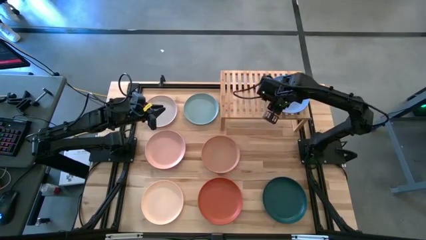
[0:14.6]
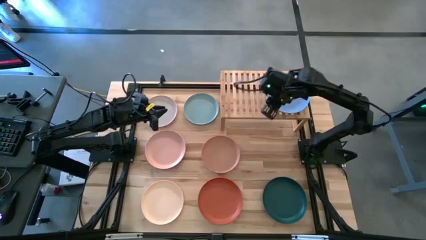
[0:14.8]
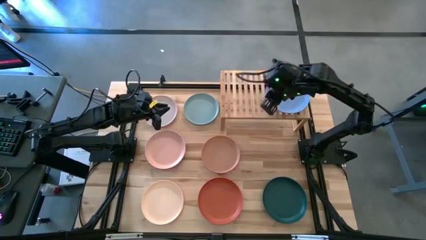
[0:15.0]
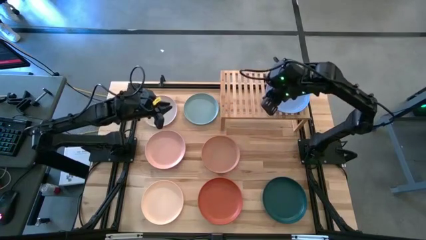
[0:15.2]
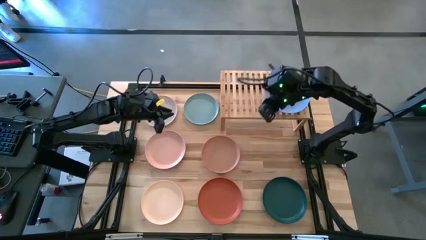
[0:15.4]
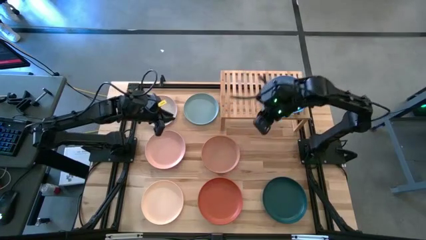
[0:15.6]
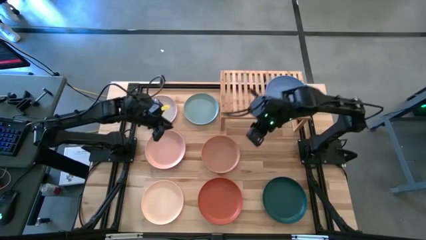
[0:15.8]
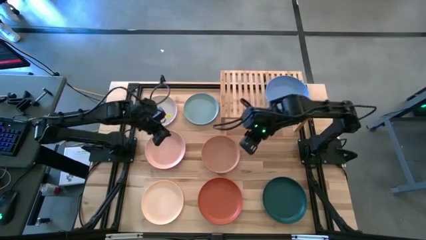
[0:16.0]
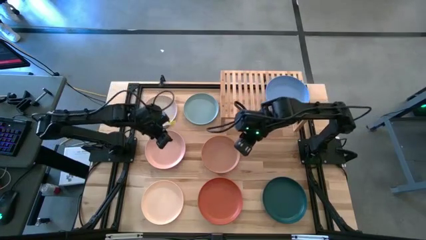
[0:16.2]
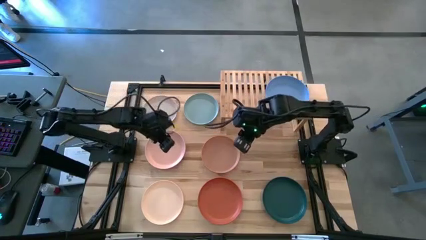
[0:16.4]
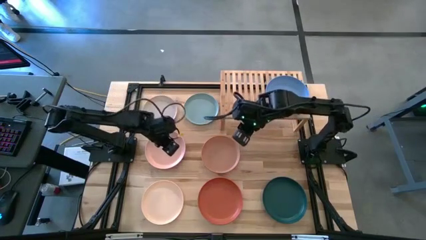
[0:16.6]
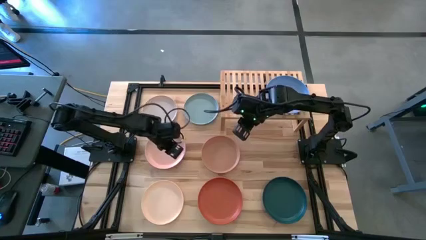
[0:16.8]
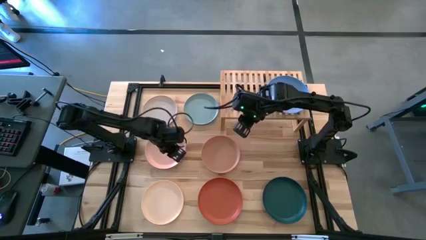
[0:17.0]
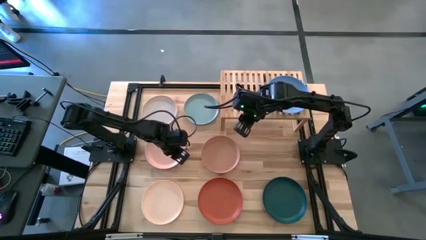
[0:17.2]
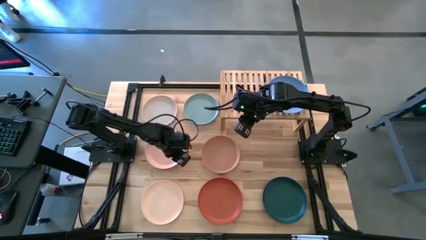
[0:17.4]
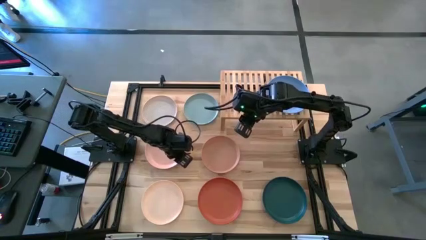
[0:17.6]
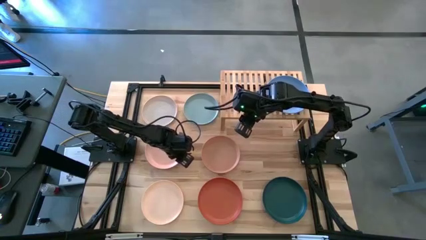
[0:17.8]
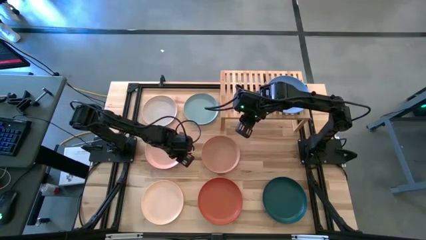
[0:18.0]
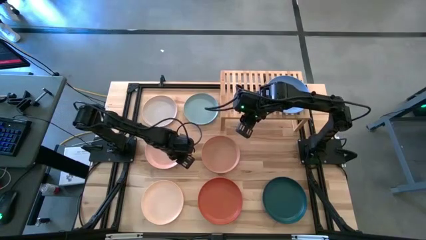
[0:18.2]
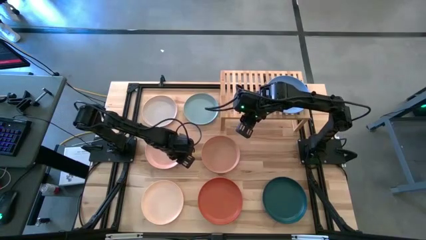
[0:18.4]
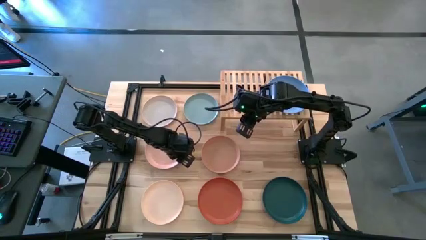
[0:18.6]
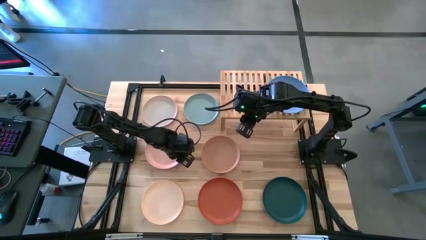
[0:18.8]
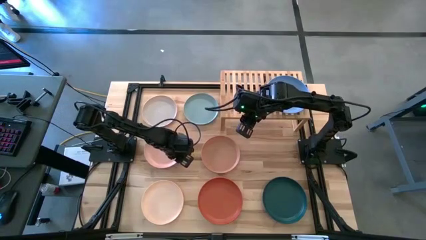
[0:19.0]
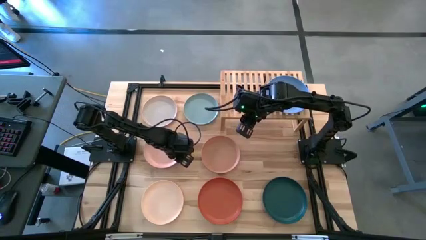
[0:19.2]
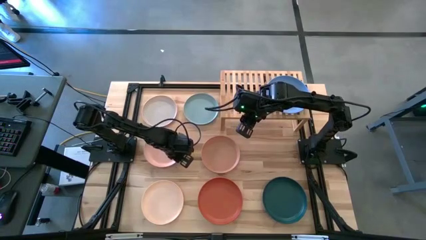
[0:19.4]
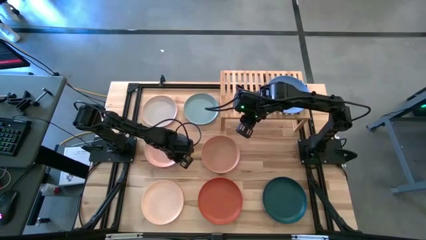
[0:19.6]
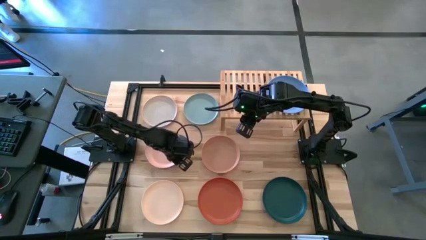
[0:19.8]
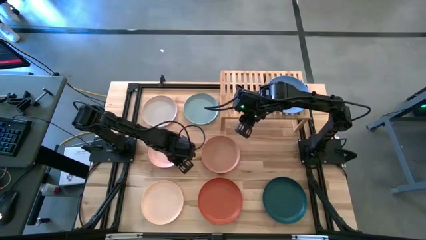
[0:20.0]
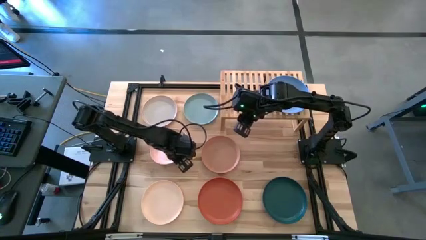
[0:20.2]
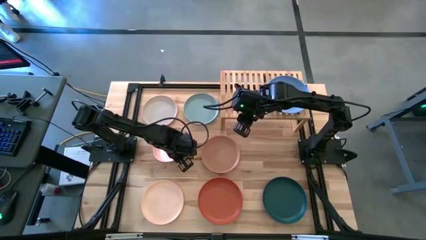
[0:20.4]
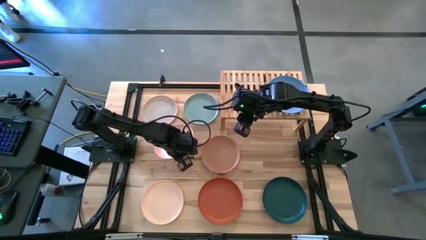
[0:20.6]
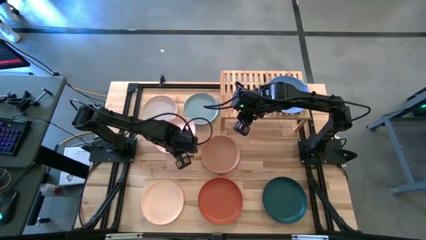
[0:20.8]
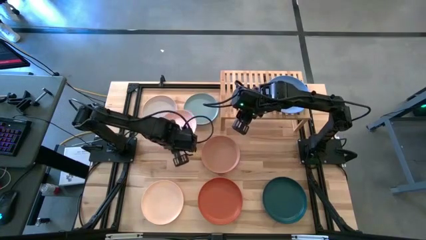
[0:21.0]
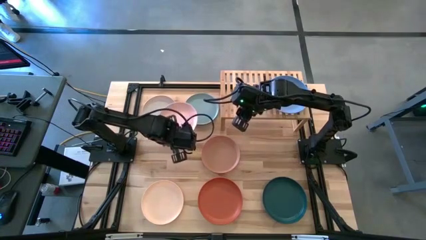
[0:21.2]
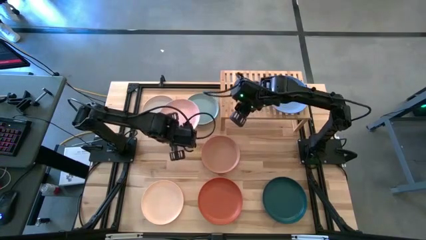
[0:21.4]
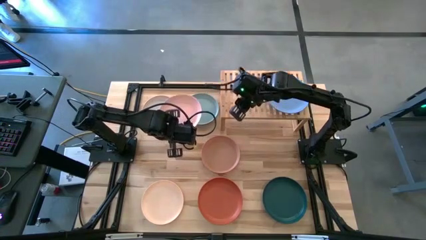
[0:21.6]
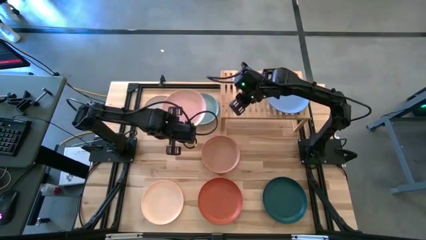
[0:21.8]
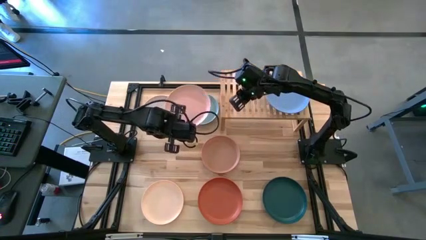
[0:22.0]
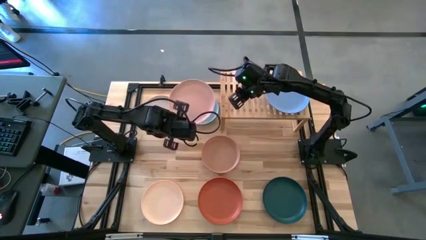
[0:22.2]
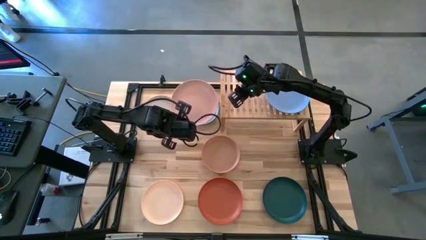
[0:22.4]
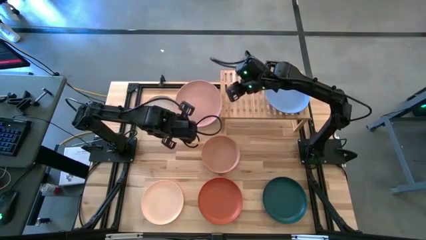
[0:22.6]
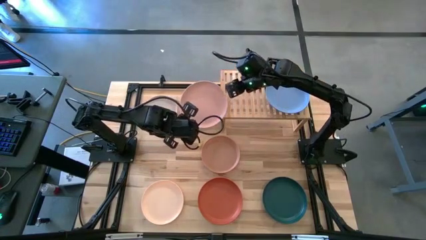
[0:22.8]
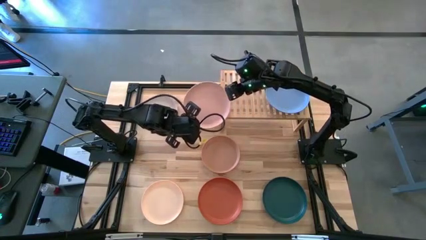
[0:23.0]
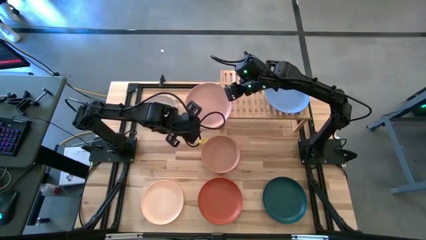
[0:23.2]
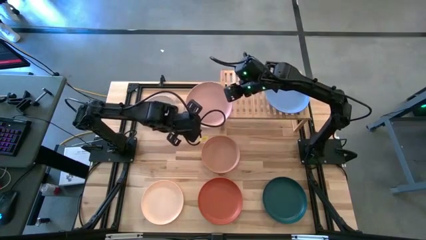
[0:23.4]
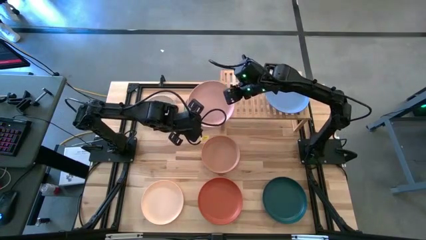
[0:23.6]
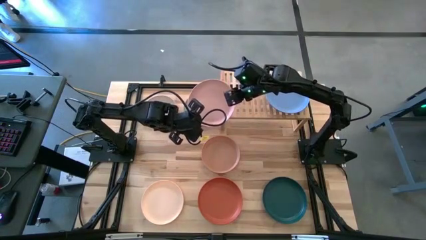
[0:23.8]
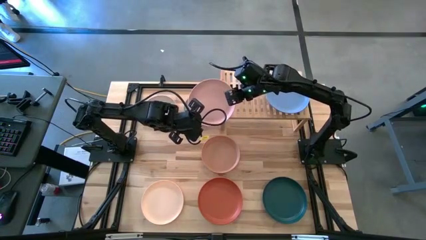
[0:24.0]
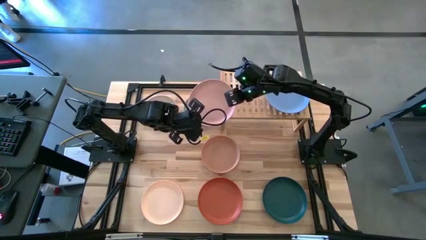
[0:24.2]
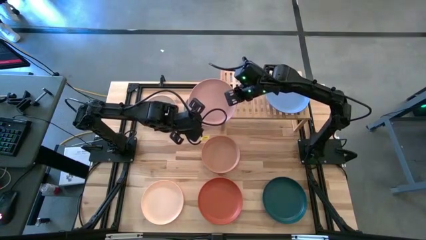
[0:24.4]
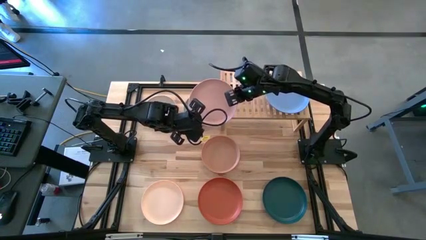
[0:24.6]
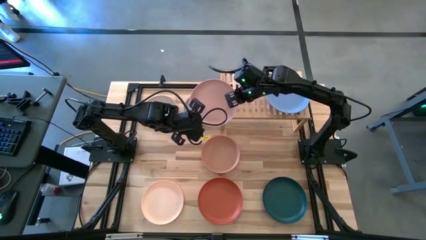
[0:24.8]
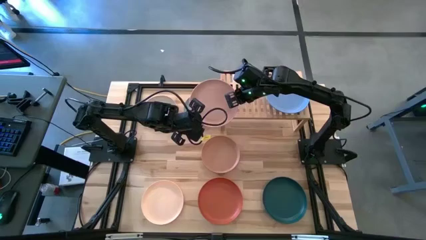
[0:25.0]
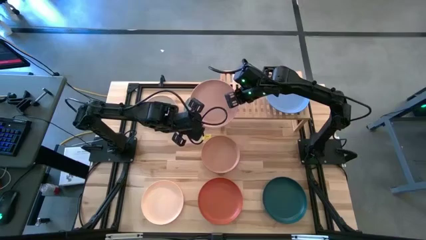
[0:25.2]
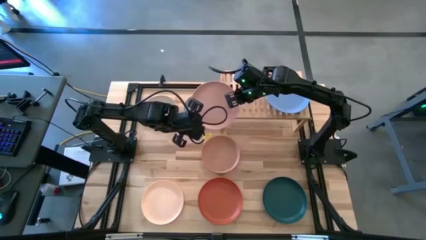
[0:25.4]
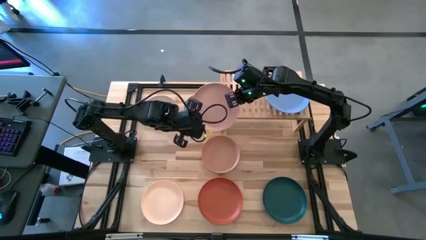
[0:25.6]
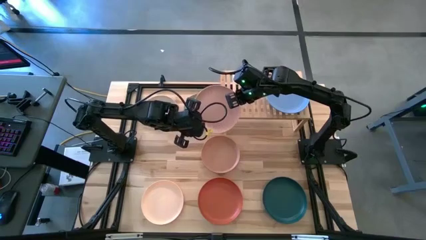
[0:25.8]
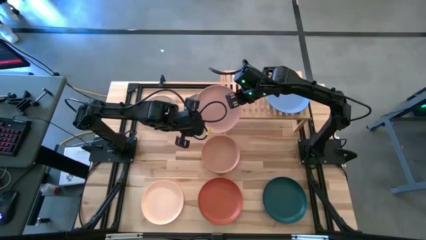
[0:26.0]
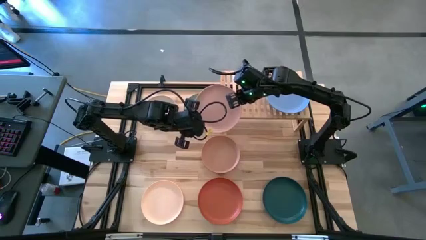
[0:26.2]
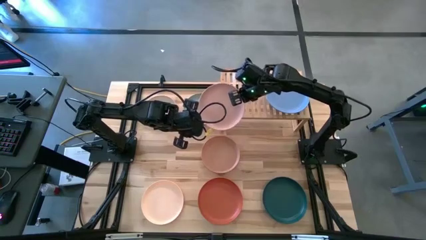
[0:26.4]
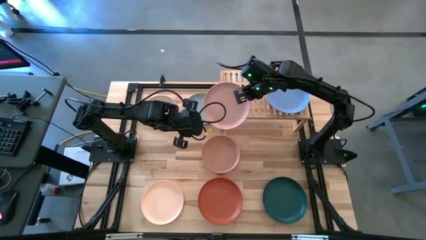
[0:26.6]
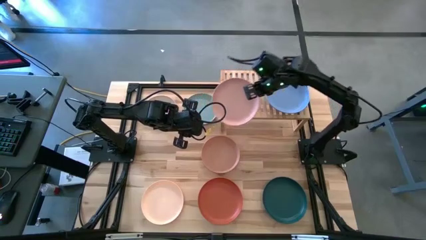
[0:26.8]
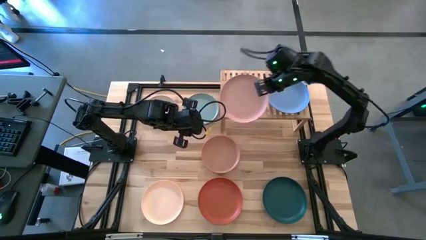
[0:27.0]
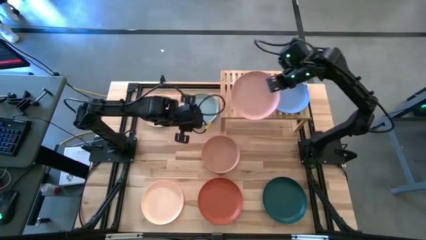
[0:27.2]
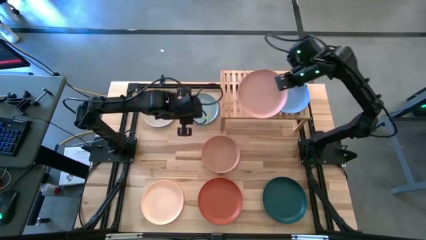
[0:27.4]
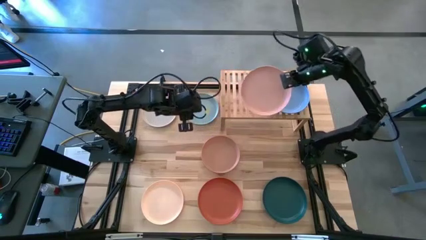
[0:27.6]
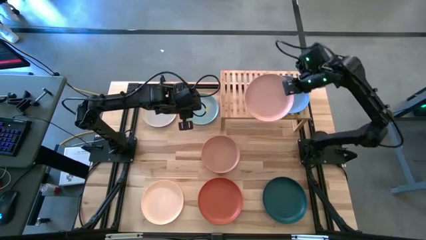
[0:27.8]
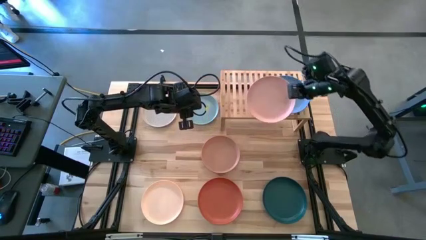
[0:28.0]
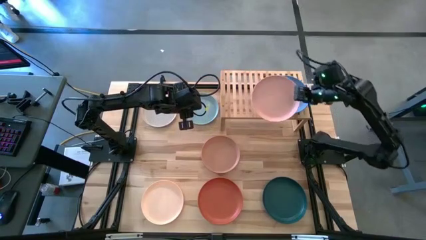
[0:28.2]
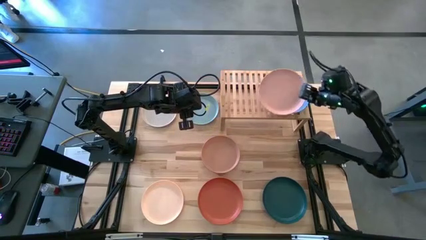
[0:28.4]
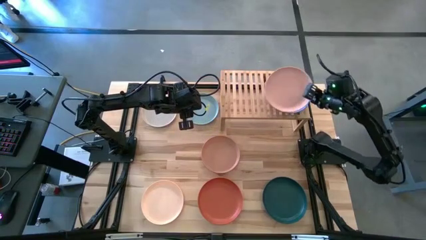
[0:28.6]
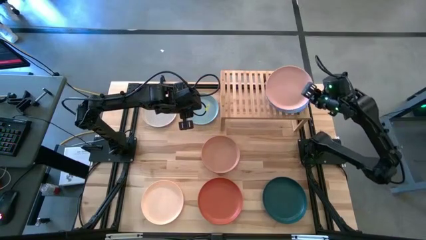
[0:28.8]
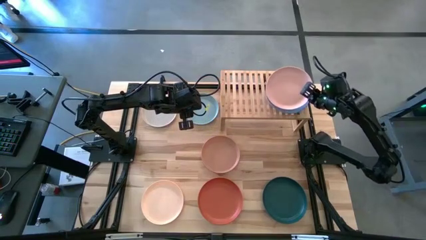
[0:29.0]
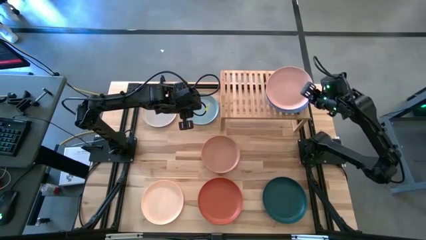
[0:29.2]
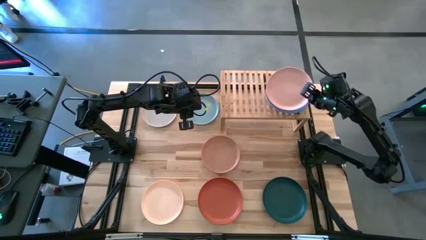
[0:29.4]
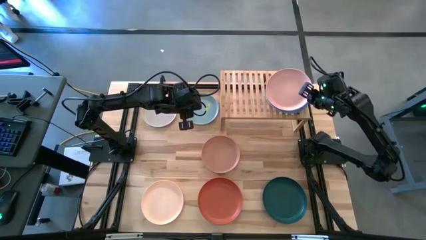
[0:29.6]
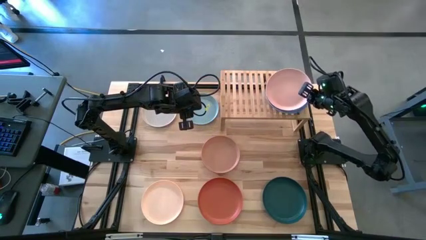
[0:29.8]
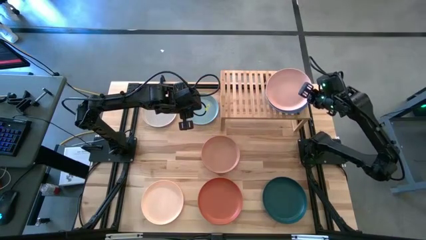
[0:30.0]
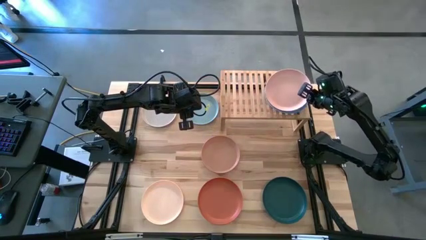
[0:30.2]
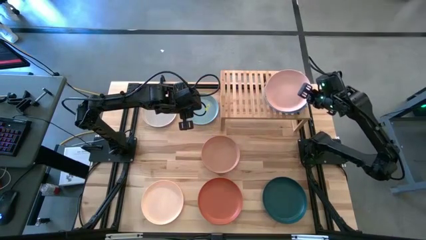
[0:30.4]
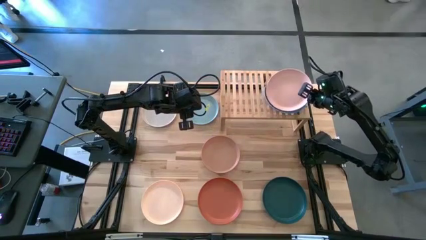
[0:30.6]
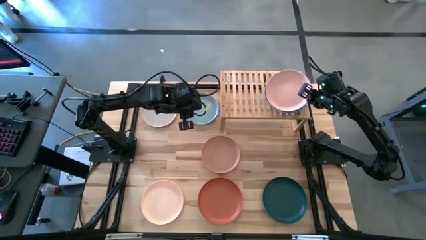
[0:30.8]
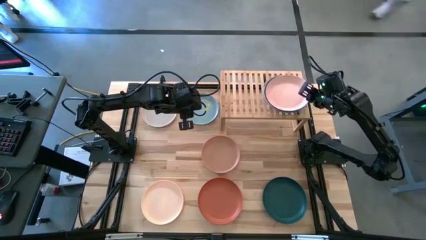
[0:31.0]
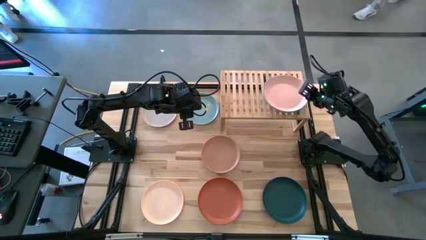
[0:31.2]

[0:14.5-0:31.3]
Task: Place and stack plates onto a shelf
Stack the pink plate on top of the blue plate on the shelf
